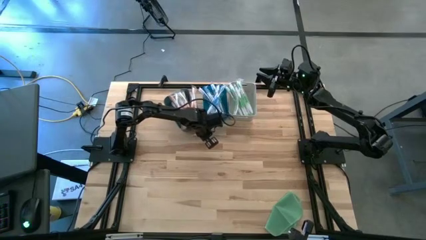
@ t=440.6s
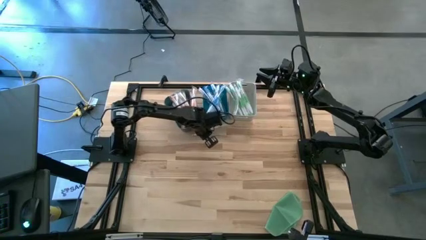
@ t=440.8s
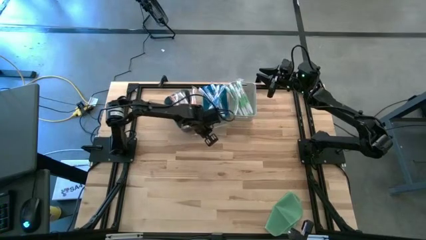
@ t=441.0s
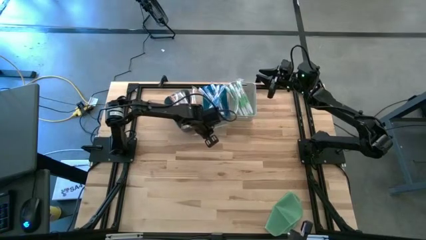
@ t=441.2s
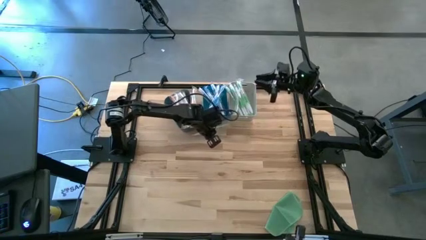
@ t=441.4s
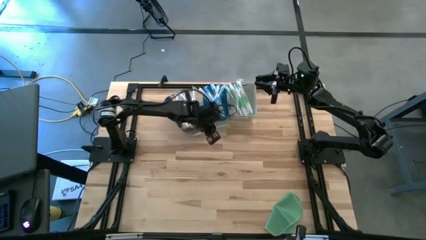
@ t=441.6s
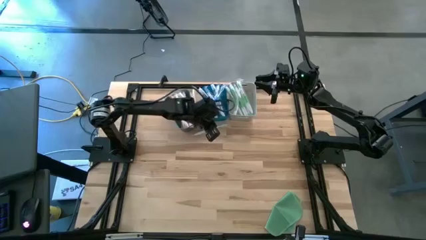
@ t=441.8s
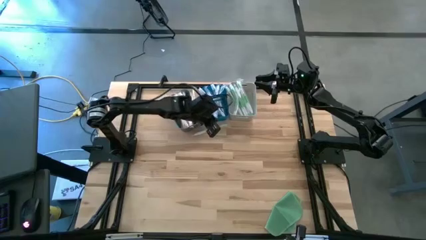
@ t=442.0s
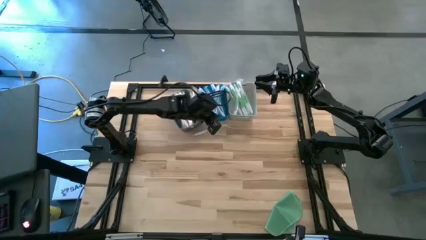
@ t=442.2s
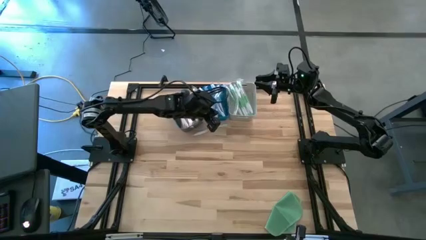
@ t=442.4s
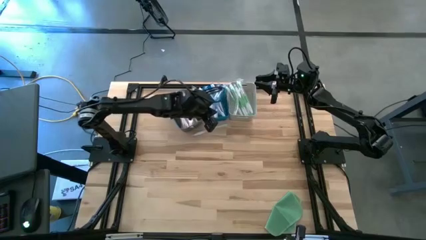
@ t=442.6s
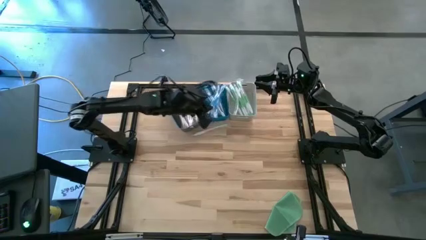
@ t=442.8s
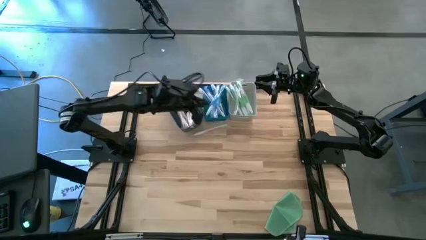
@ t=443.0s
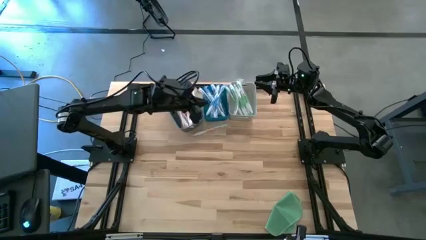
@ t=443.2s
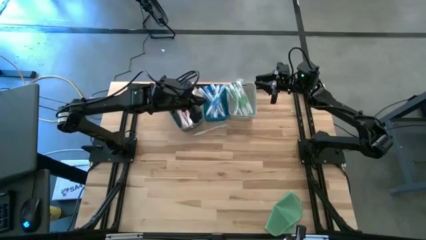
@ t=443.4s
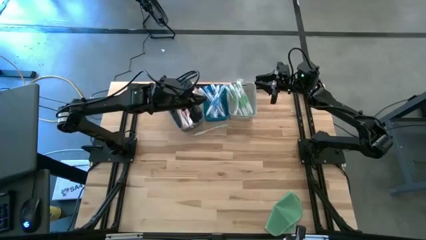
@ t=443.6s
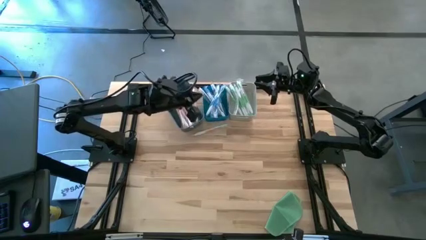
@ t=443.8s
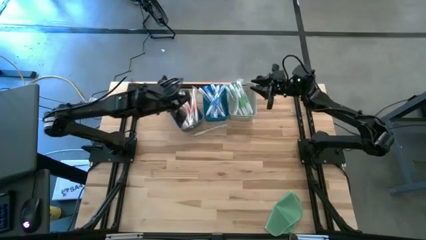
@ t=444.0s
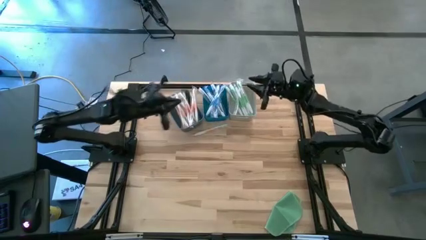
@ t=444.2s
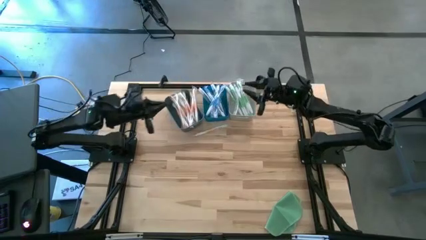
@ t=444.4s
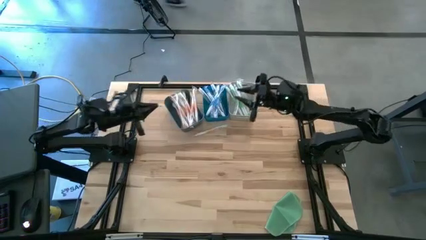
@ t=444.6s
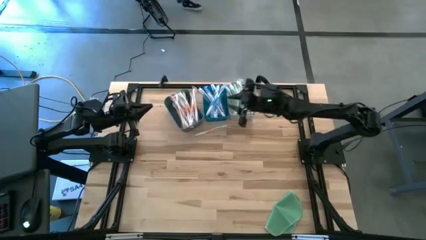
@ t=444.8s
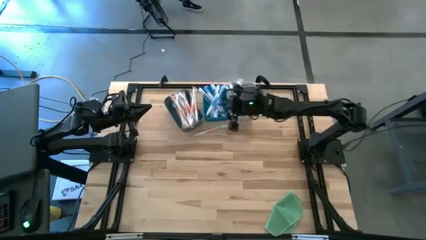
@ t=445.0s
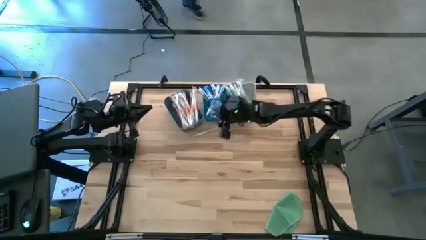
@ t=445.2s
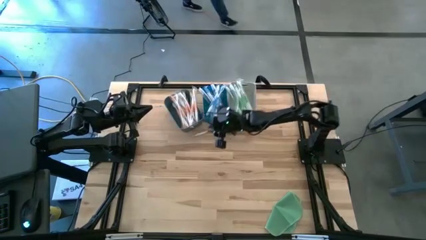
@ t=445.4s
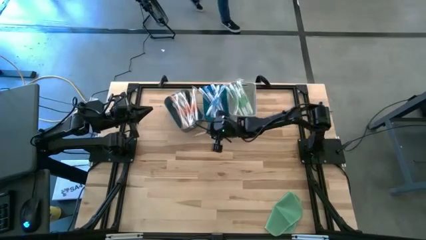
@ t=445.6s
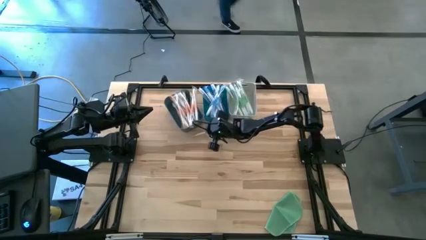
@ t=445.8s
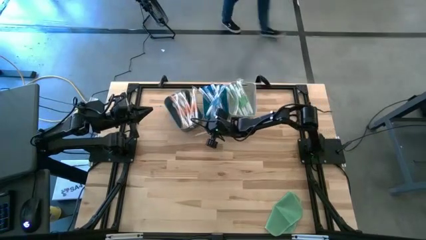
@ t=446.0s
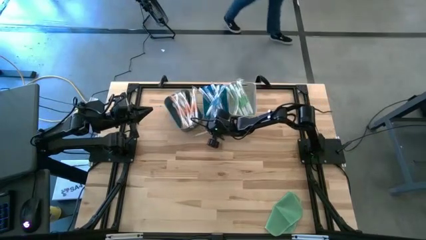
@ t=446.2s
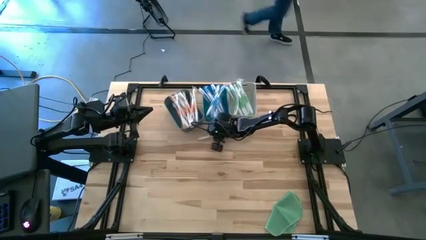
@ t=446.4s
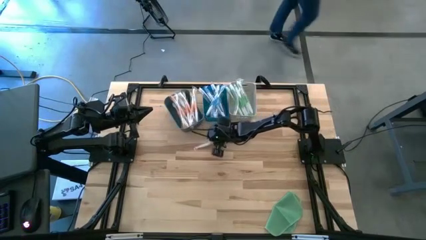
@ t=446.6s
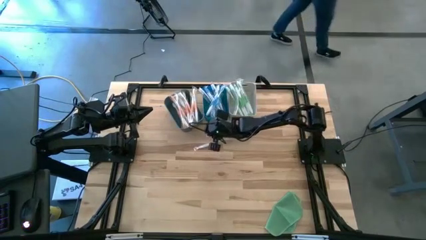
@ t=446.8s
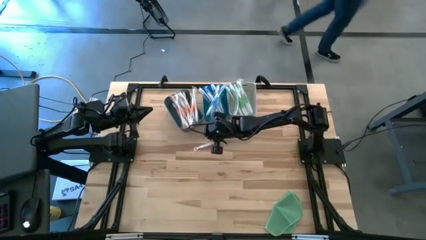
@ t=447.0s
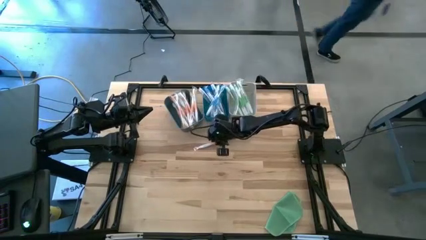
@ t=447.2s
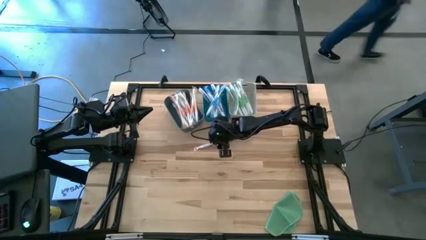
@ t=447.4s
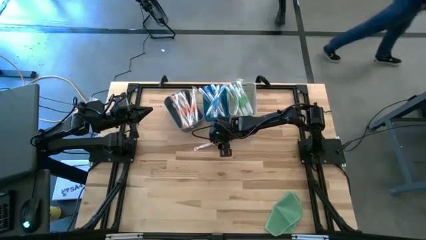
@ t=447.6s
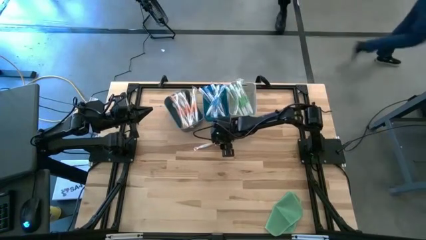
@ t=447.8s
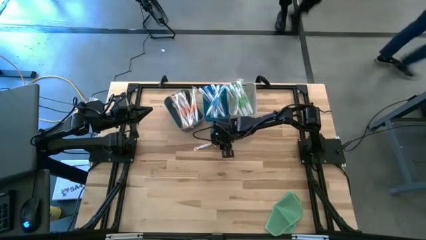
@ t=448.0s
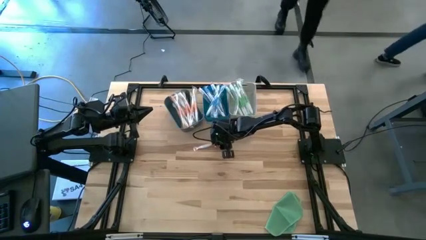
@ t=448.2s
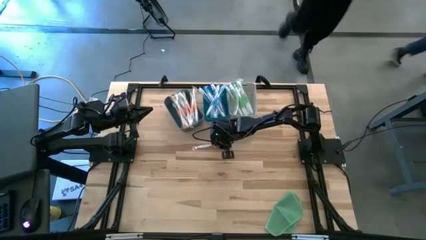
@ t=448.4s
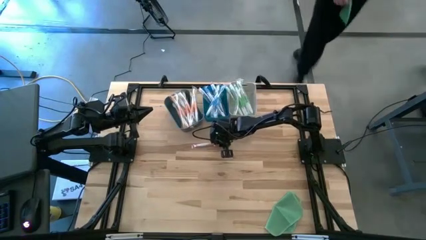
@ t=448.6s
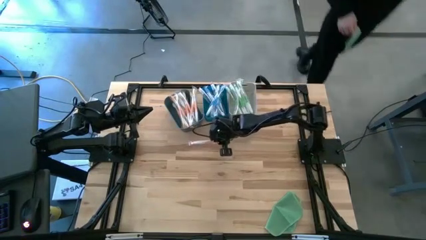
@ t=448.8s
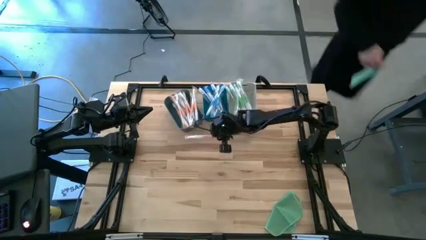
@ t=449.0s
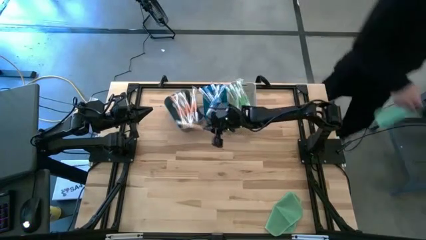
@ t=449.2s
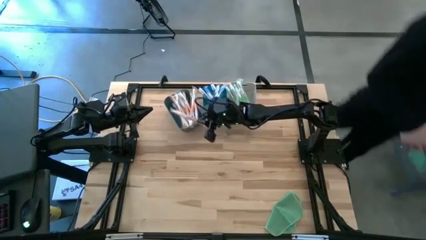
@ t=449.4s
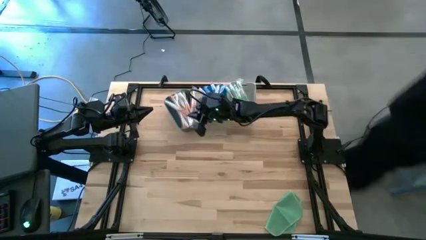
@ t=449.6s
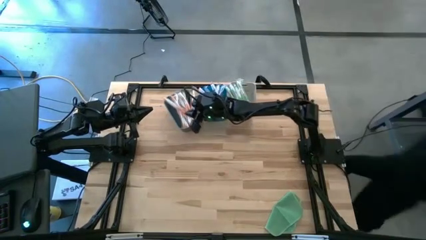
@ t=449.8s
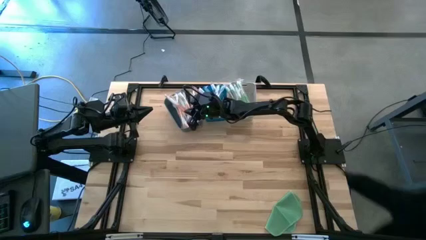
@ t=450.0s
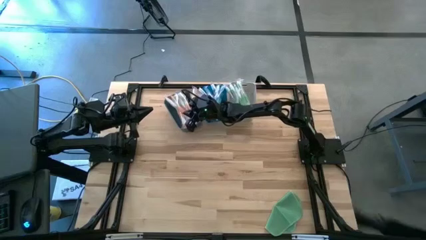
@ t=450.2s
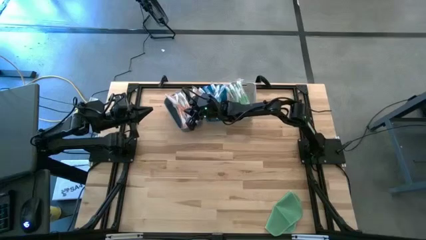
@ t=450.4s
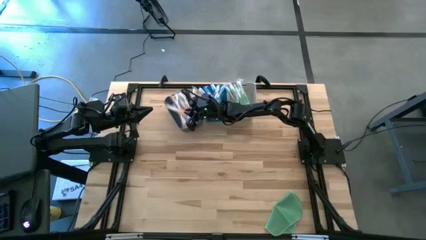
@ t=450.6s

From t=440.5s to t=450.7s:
Task: Pick & Place Toothbrushes
Put the orange toothbrush into the dark blue bin

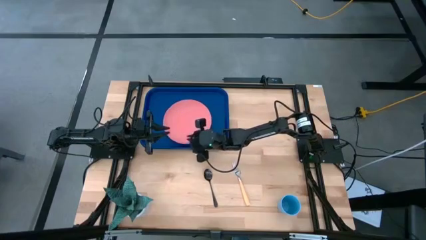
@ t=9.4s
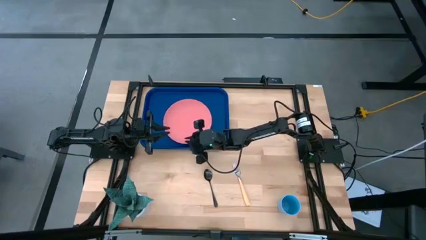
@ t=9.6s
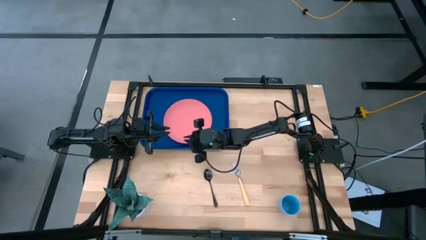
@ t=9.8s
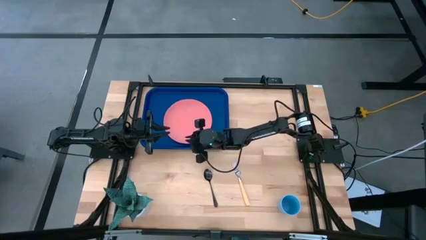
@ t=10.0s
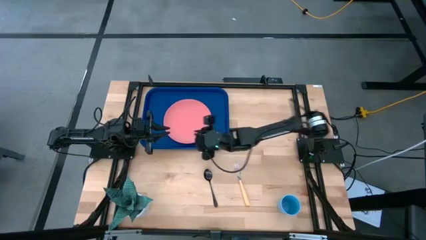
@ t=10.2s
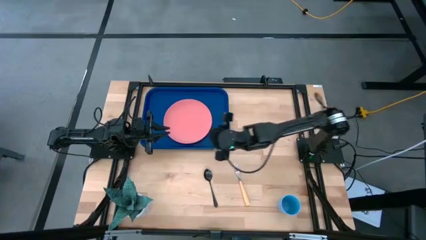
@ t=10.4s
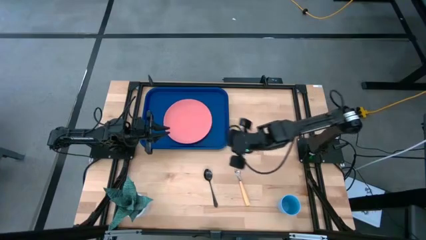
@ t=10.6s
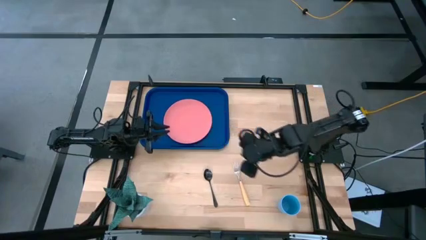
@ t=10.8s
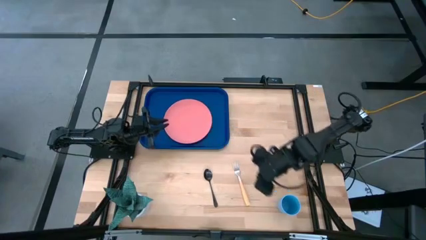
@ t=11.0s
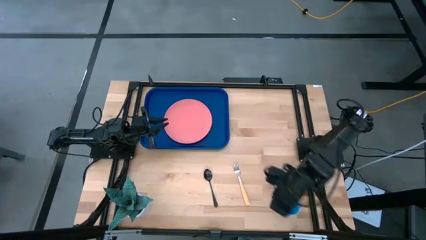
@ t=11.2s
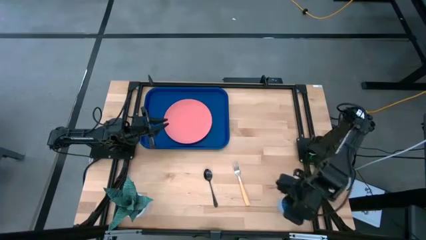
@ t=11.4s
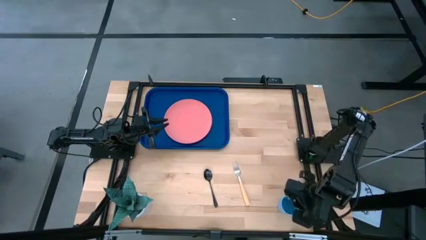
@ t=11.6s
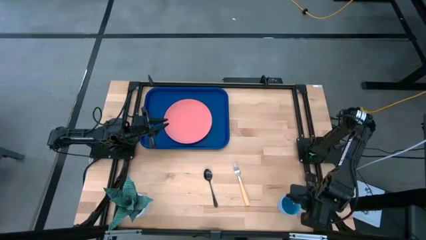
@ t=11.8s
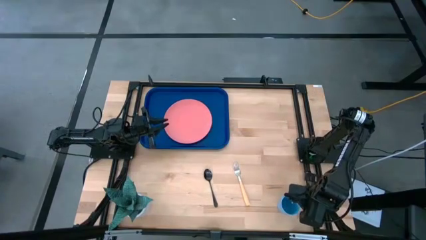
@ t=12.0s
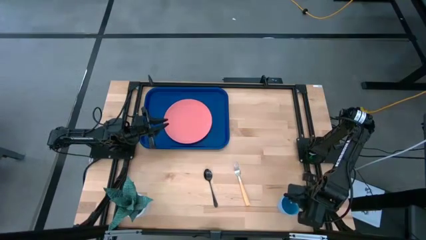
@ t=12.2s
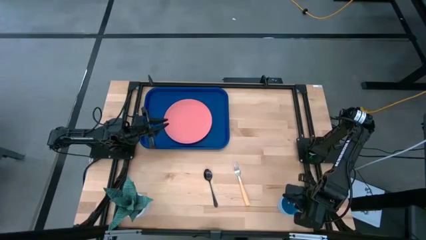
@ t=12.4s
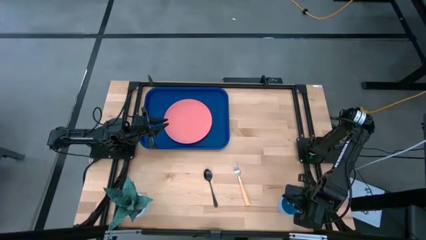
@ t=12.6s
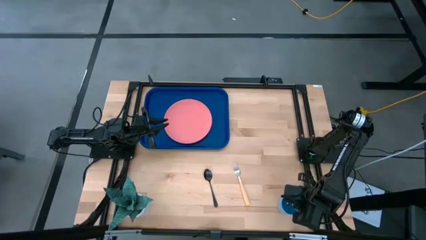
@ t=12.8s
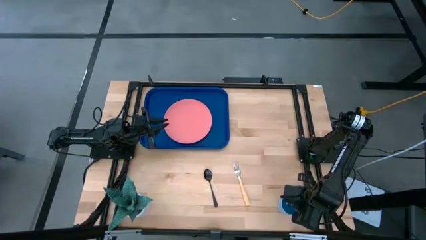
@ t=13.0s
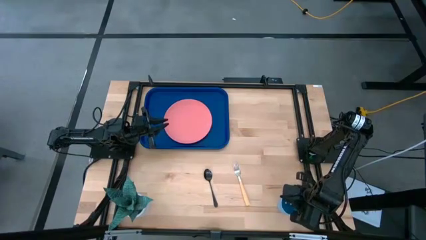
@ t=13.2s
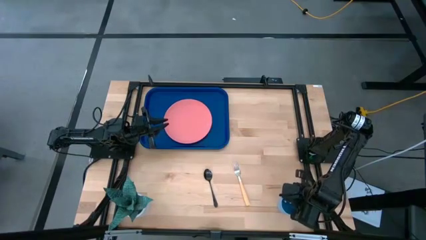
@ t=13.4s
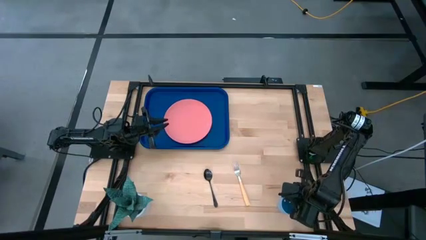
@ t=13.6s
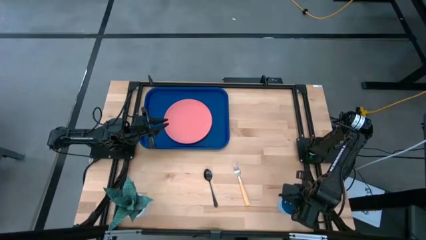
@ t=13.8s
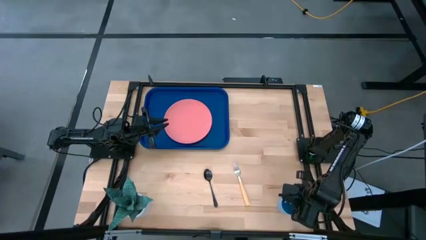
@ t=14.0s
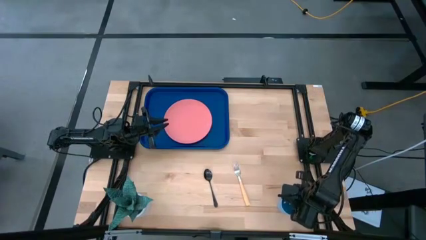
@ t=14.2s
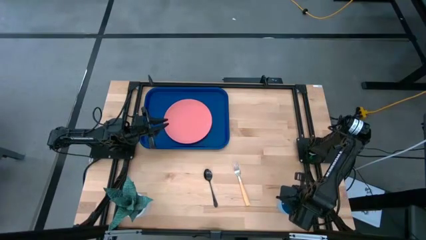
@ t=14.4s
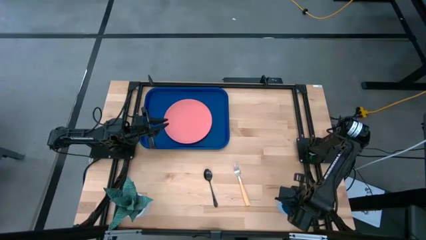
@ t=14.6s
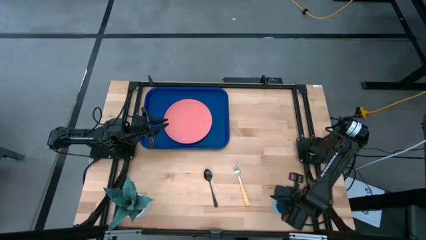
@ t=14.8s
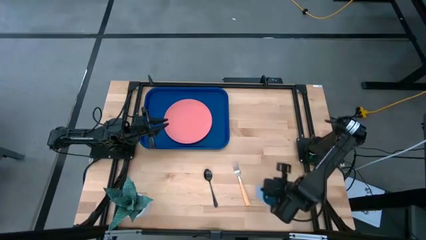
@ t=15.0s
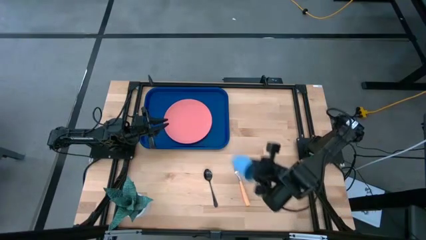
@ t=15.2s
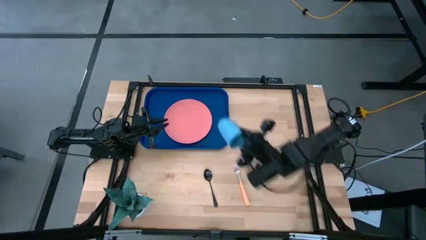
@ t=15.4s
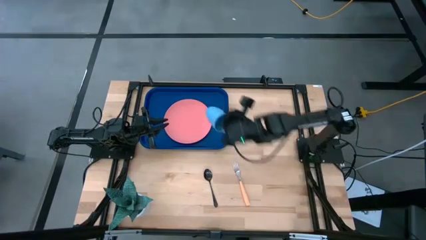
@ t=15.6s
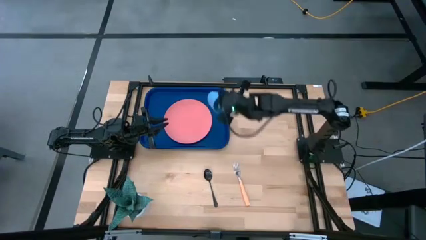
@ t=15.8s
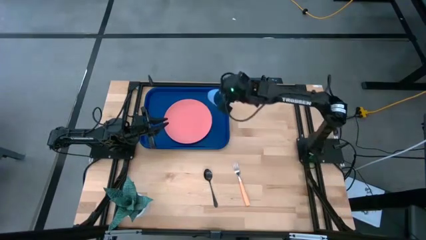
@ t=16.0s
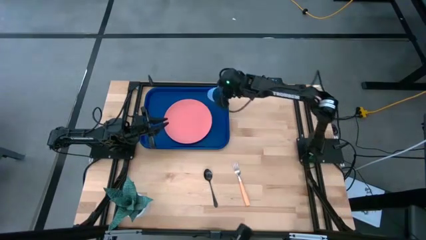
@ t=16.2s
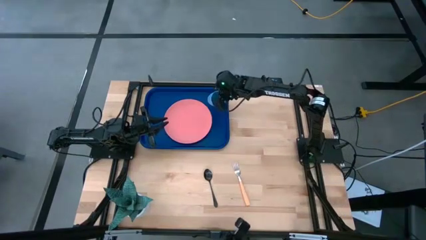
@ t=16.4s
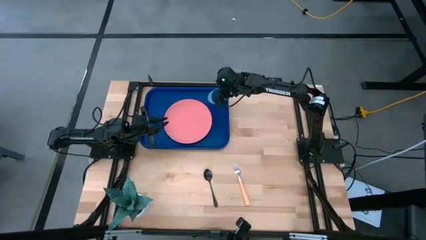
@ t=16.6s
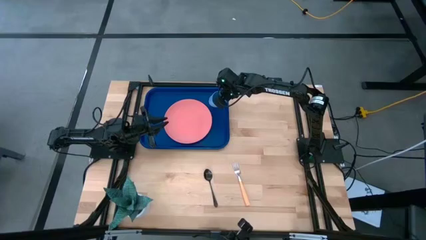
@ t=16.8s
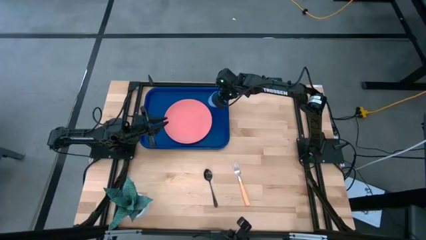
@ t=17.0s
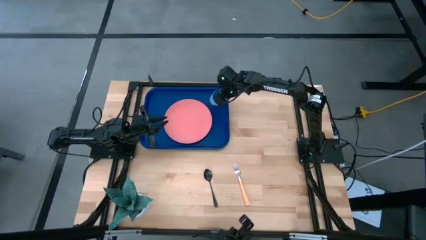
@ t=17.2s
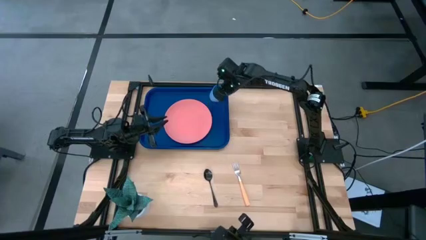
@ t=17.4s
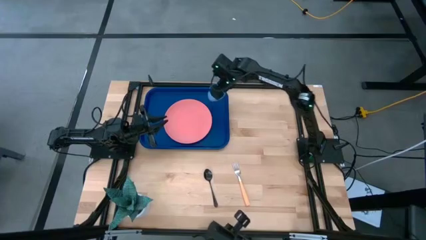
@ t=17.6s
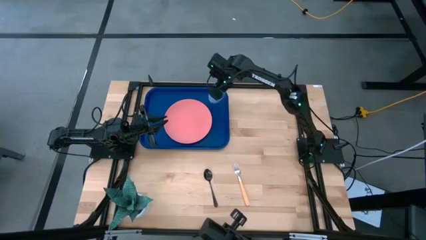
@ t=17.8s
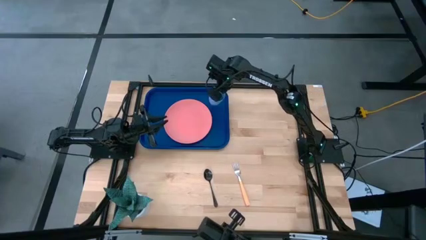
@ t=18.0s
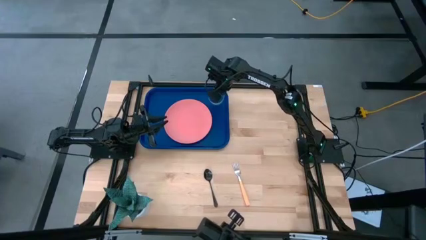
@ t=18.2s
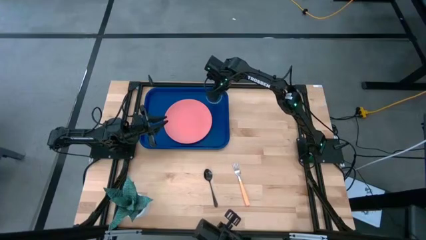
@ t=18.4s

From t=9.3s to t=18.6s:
Task: Pick and place plate/cup/fork/spoon on tray
Put the blue cup on the serving tray top right side of the pink plate
